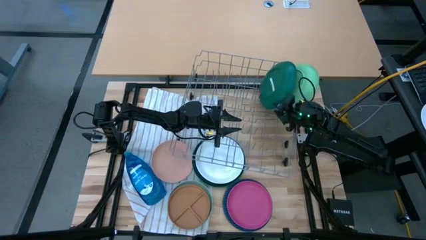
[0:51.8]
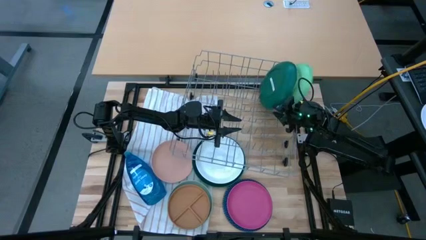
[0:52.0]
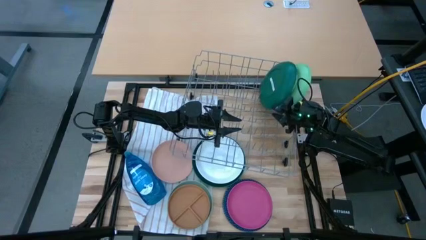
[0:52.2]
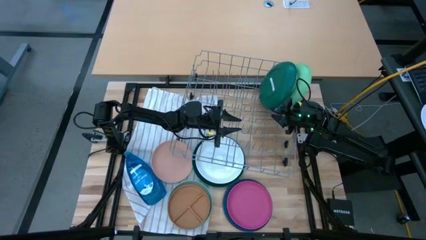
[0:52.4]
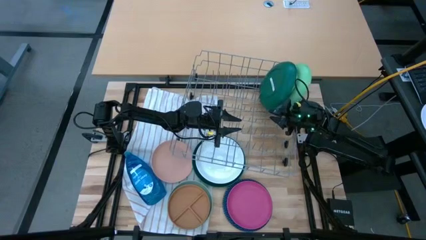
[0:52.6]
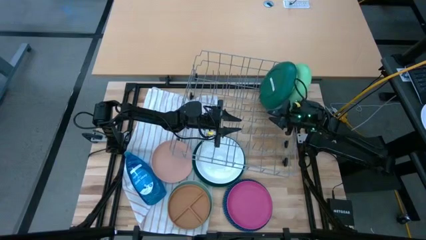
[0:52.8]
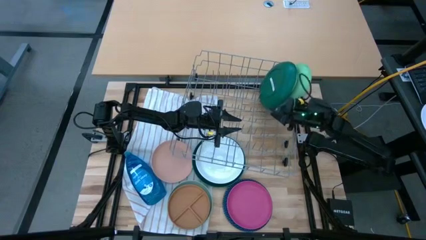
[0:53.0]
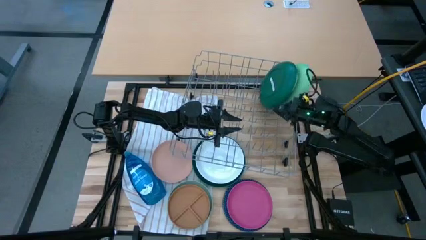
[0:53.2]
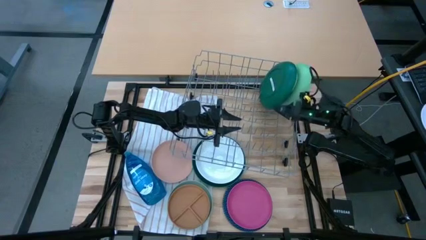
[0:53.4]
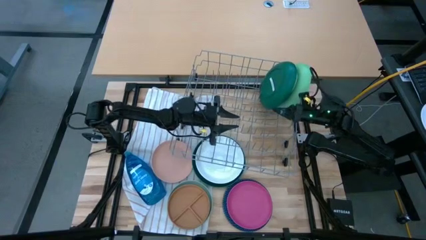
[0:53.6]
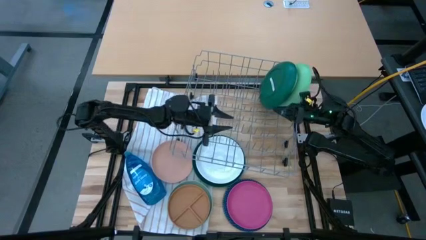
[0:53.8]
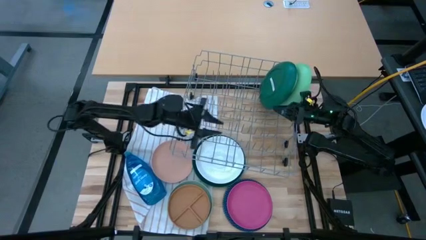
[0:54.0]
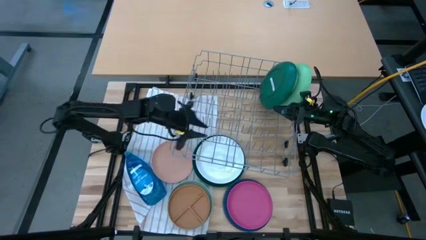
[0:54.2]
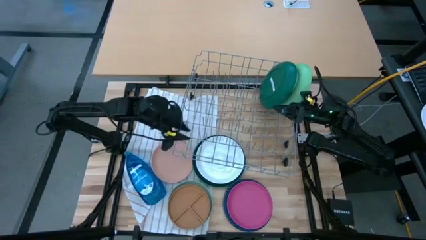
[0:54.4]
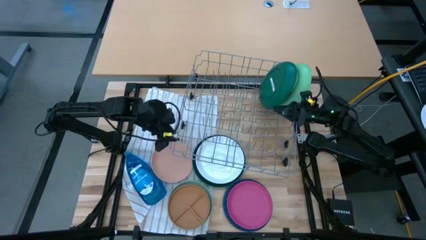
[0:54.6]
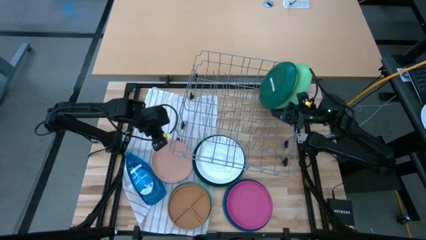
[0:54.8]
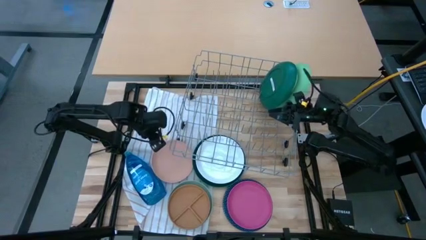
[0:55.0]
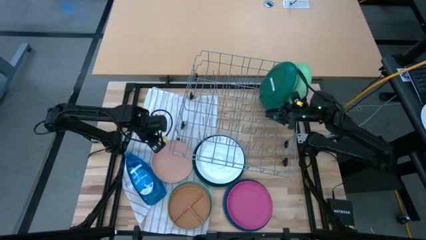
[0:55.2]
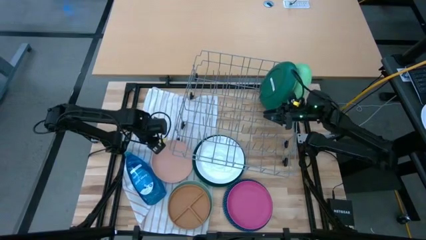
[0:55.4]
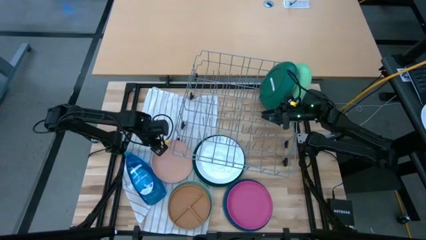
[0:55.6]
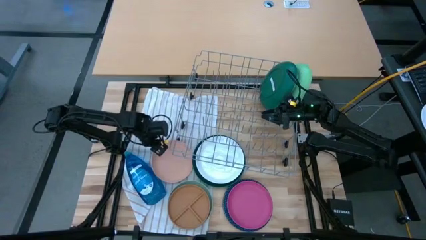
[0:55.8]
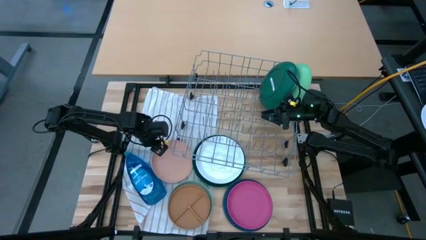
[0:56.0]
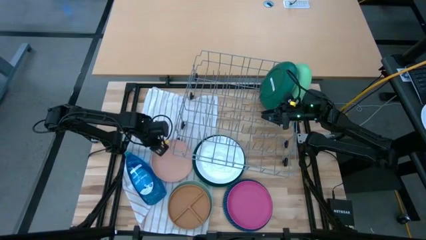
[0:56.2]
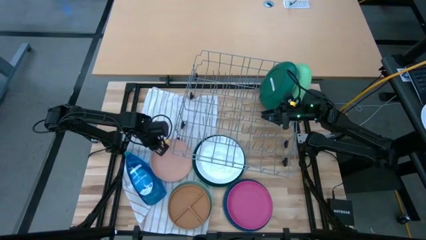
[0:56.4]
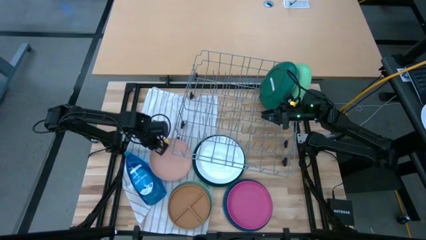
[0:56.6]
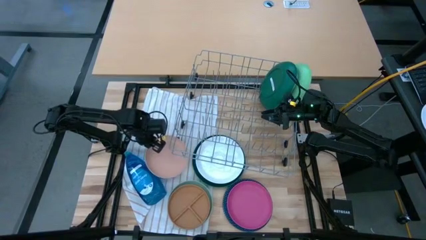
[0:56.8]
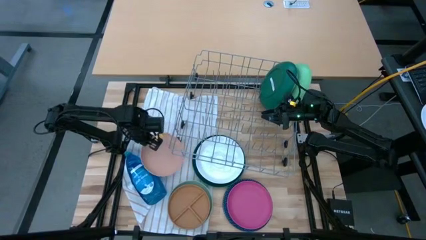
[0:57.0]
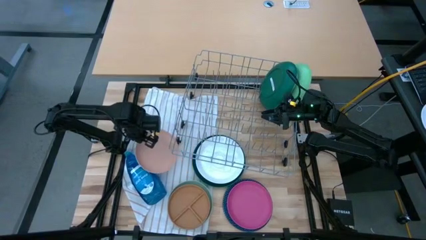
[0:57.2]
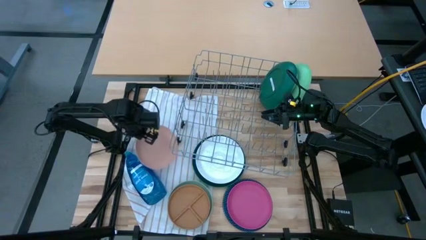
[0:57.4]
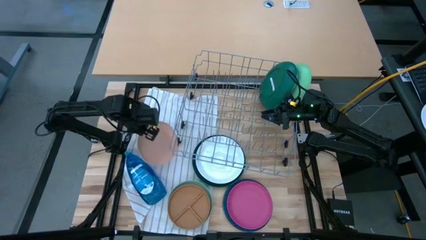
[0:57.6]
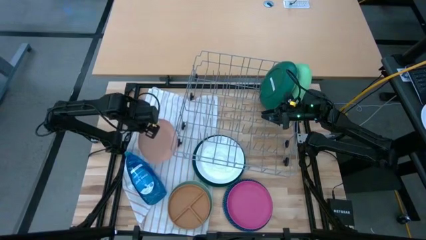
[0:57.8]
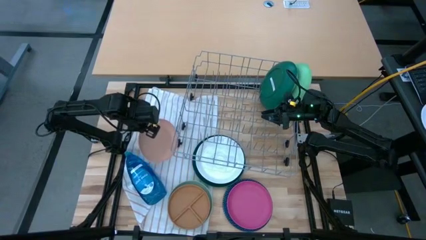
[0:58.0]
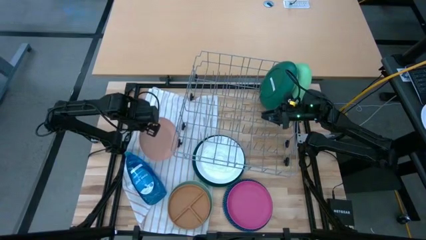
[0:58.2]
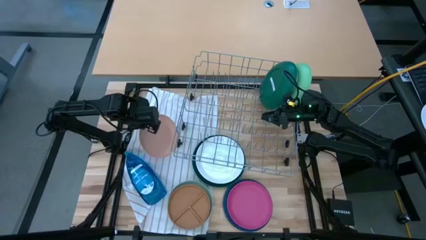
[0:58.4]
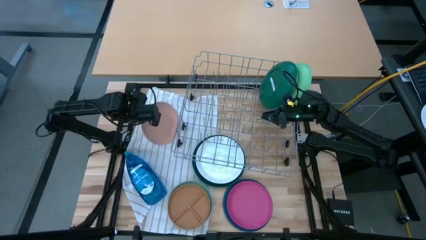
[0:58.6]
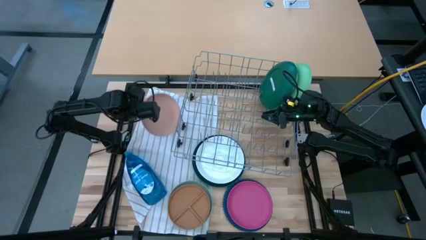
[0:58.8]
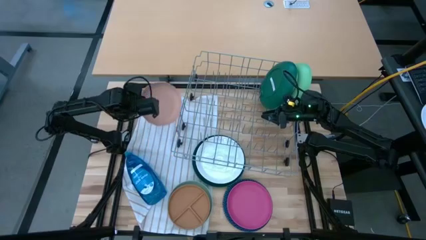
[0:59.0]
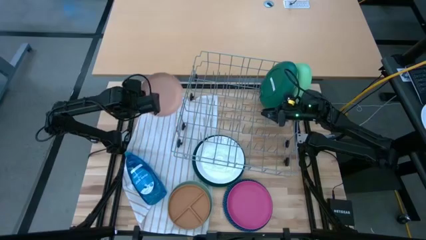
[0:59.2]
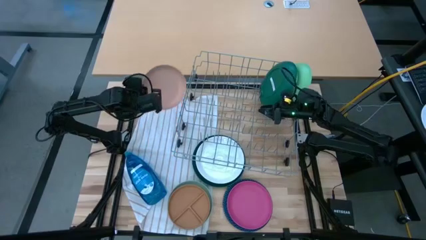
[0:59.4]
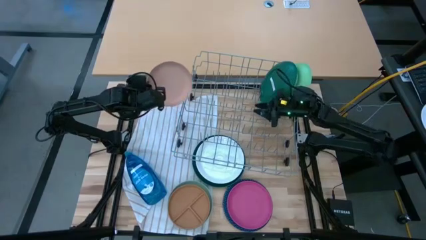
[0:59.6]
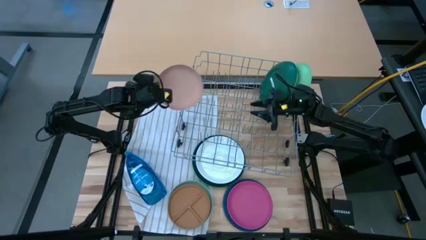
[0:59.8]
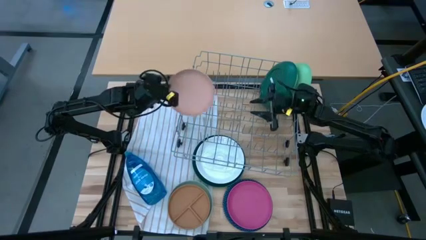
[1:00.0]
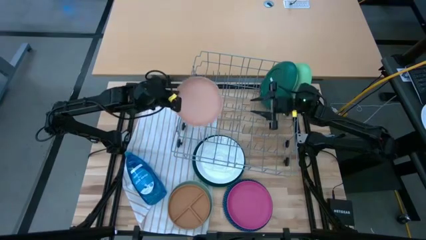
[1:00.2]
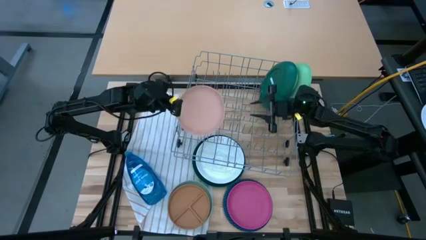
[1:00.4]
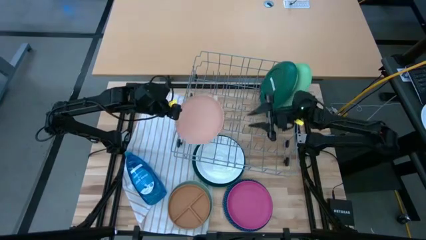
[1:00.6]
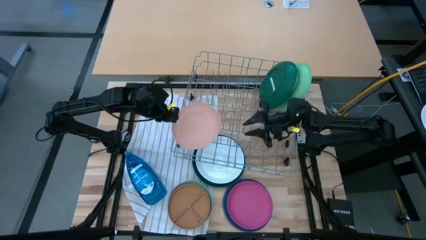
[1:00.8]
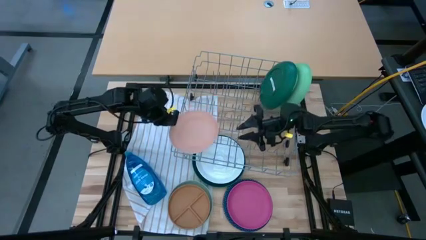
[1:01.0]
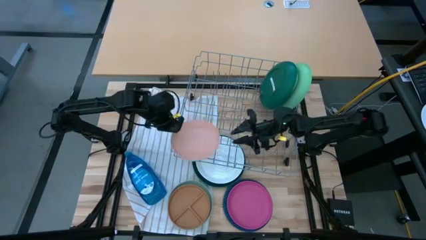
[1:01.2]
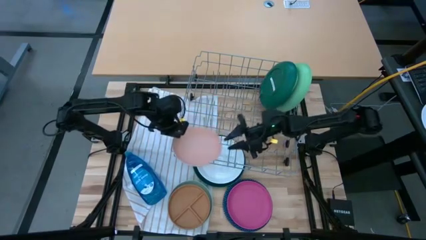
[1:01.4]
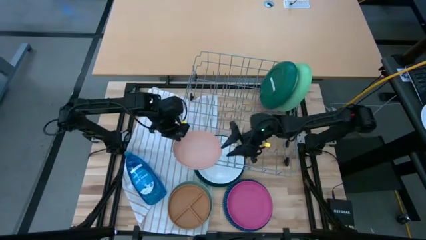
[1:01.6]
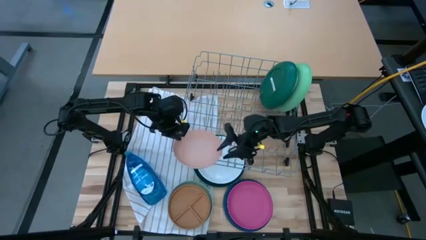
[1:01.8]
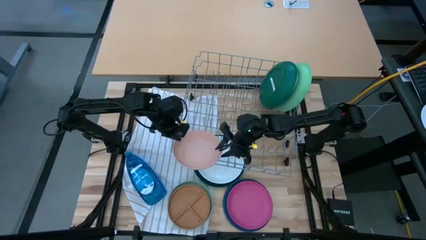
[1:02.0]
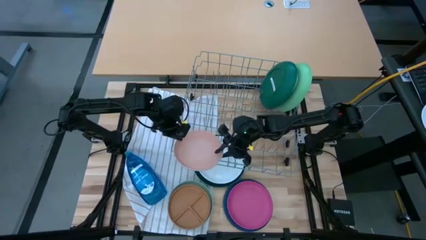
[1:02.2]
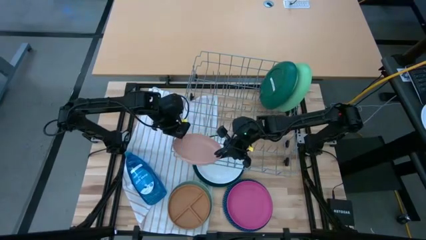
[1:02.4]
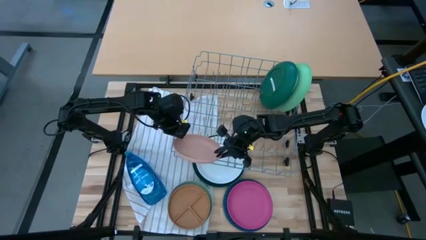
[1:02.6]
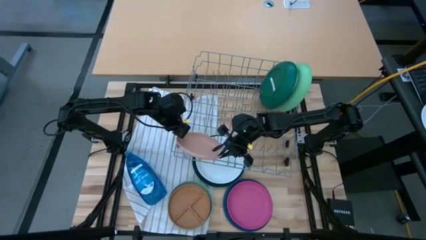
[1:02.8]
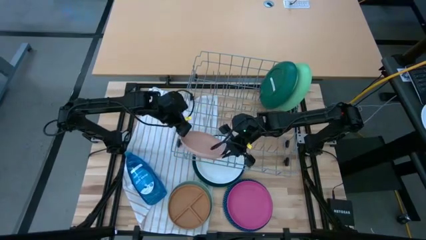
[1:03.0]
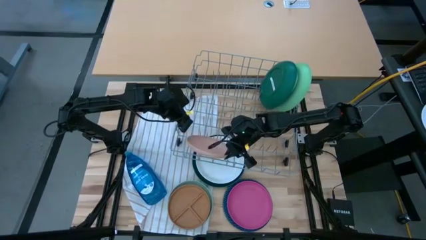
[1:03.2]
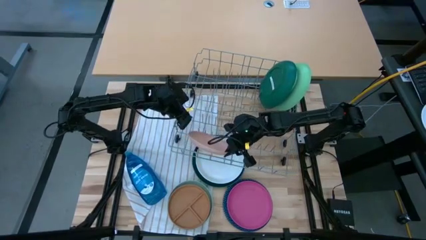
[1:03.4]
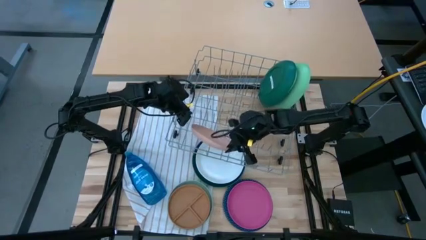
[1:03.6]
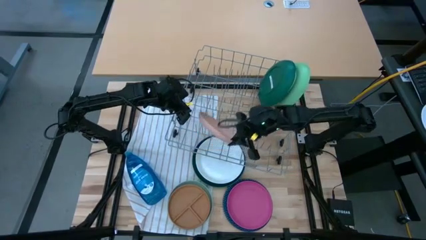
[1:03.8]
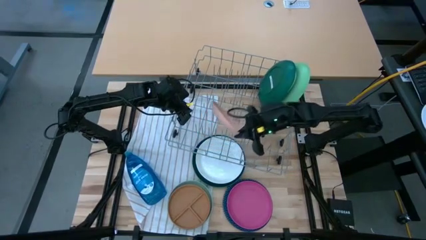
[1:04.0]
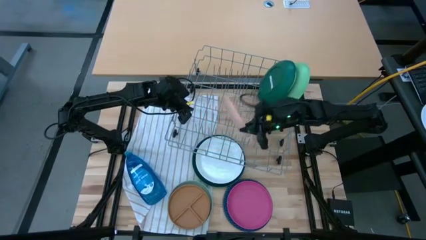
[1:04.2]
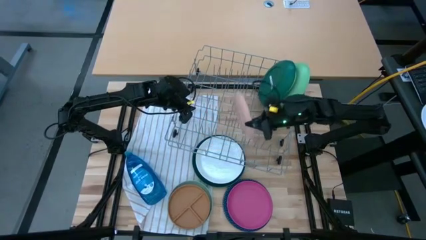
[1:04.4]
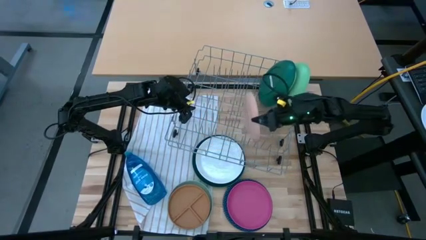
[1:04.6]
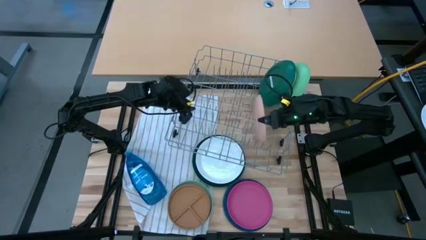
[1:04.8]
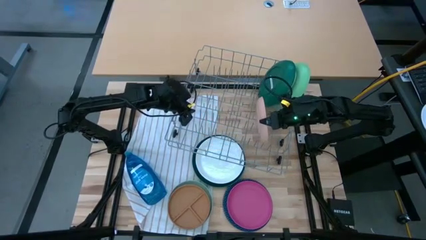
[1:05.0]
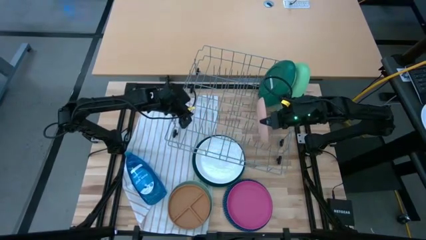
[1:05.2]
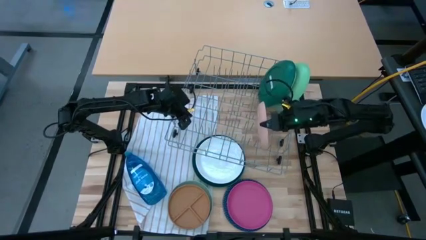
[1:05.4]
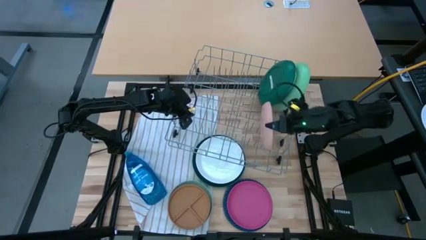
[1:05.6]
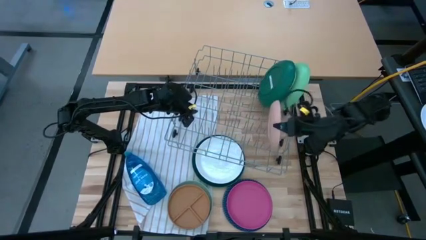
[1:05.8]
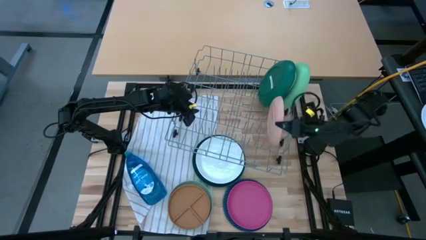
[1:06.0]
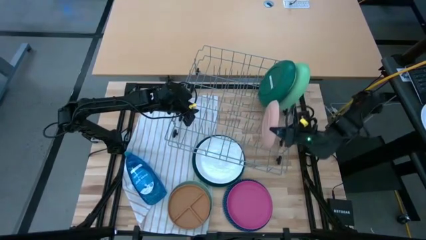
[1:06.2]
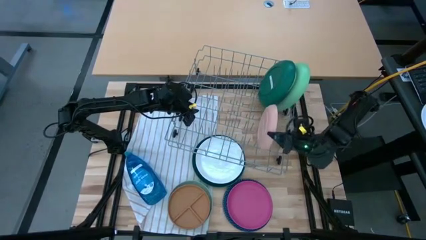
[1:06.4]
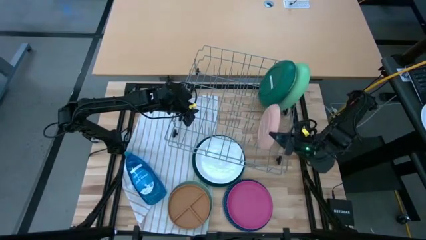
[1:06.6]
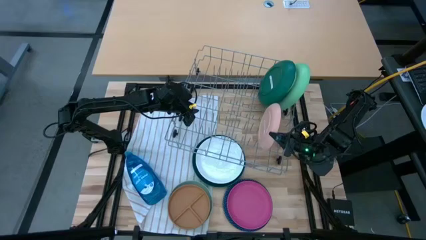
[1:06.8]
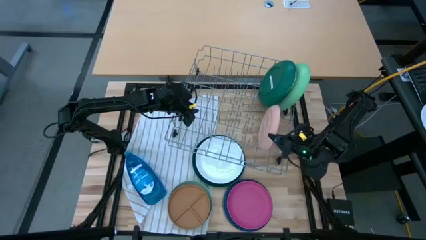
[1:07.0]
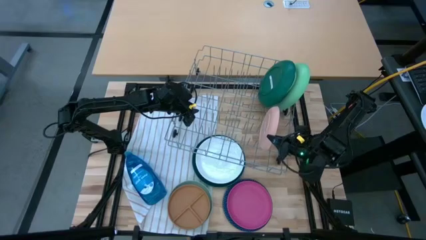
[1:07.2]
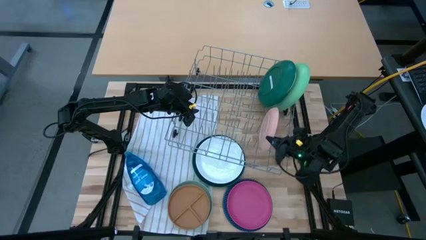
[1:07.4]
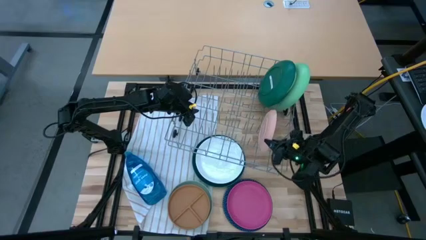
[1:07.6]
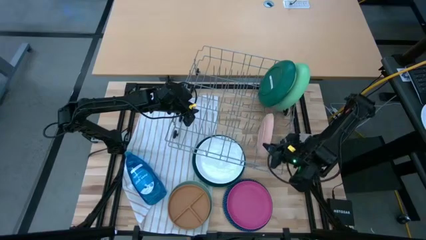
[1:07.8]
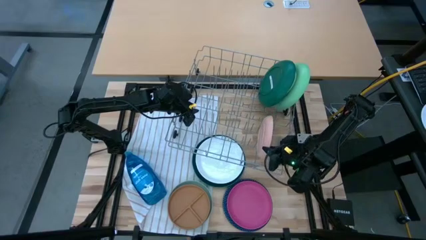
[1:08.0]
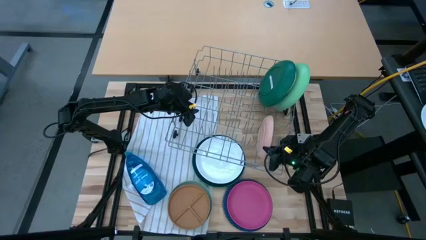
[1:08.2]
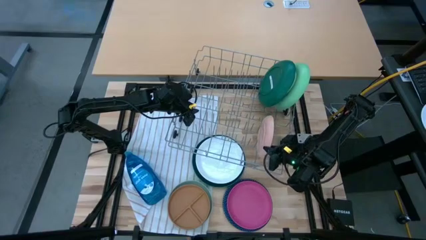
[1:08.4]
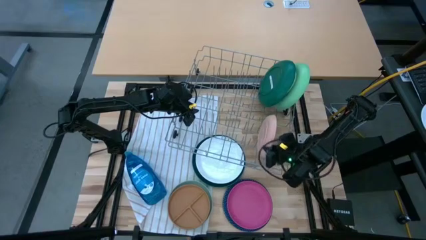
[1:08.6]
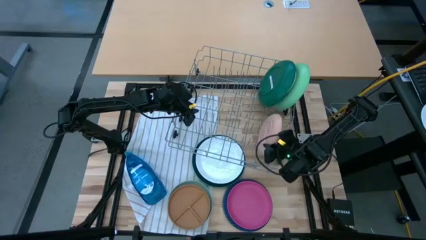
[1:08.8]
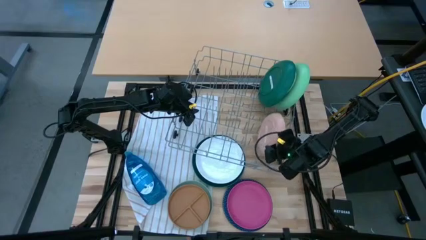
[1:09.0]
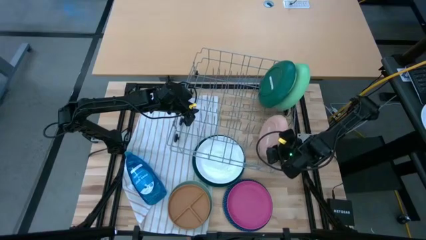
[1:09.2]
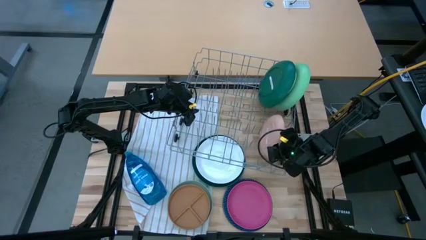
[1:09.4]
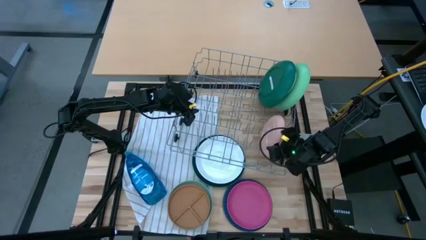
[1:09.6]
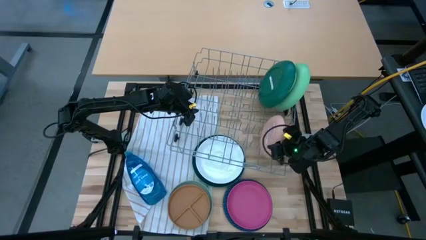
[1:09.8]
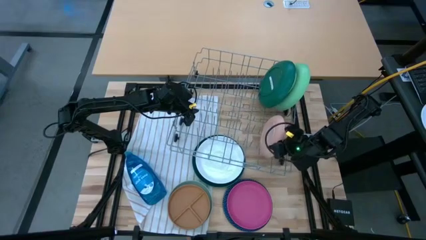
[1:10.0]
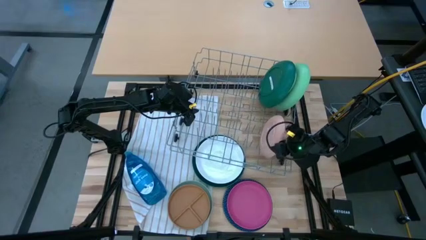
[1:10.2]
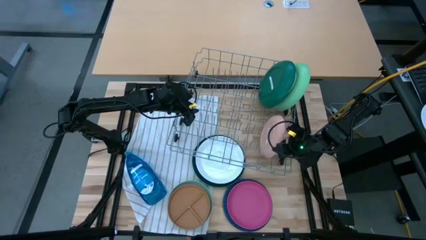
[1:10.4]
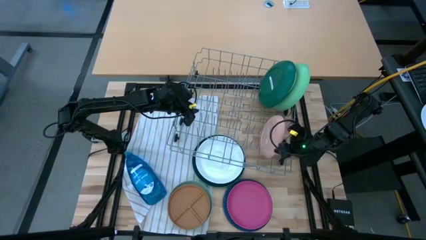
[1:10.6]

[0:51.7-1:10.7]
Task: Sort dishes
Put the light orange plate in the dish rack
